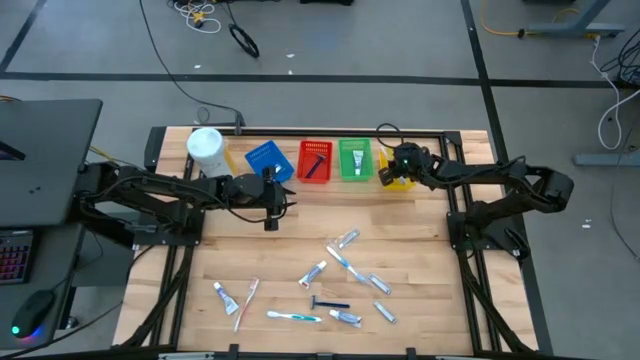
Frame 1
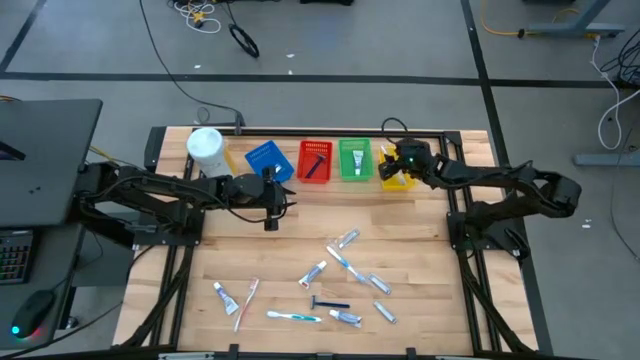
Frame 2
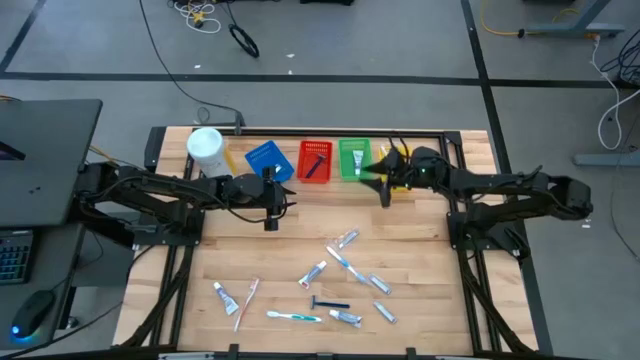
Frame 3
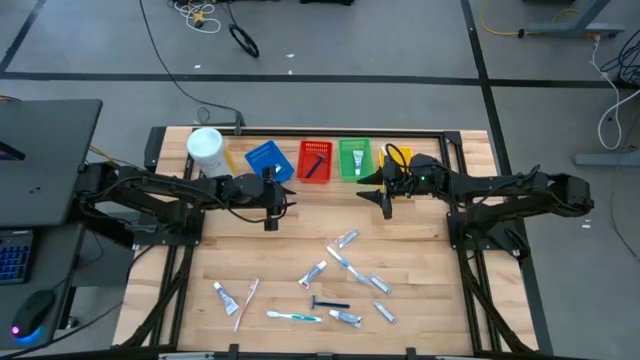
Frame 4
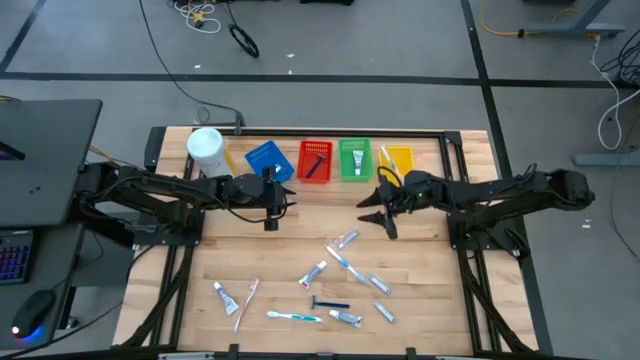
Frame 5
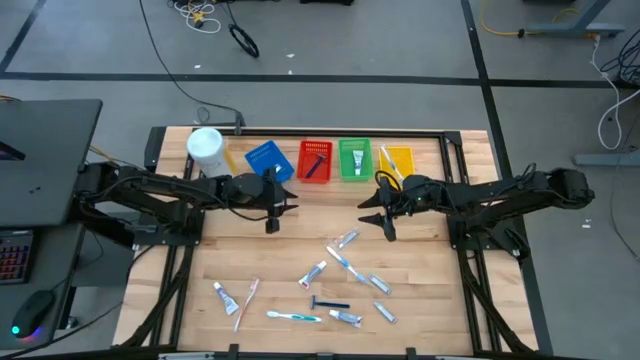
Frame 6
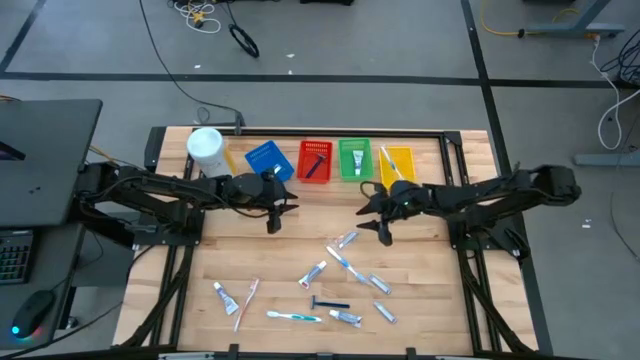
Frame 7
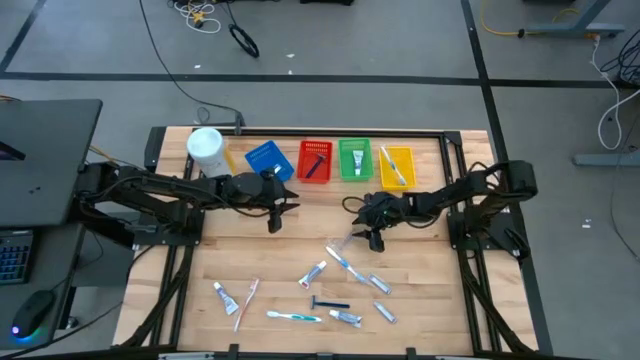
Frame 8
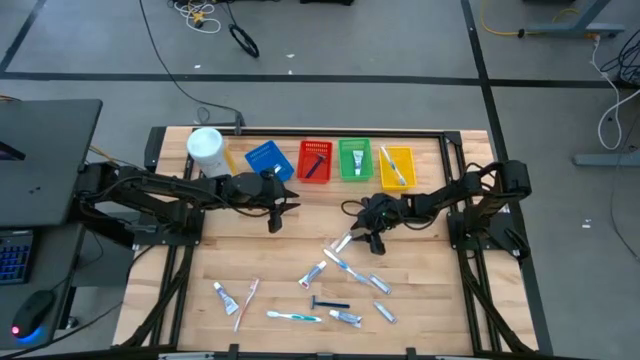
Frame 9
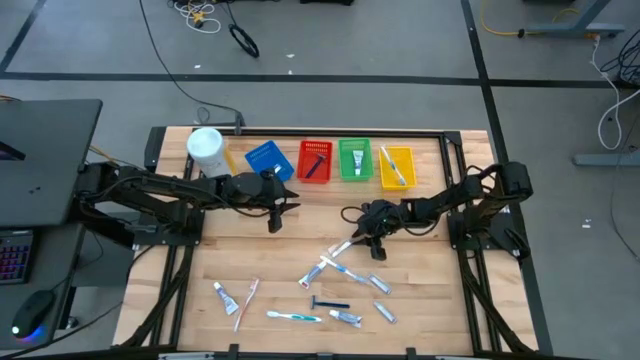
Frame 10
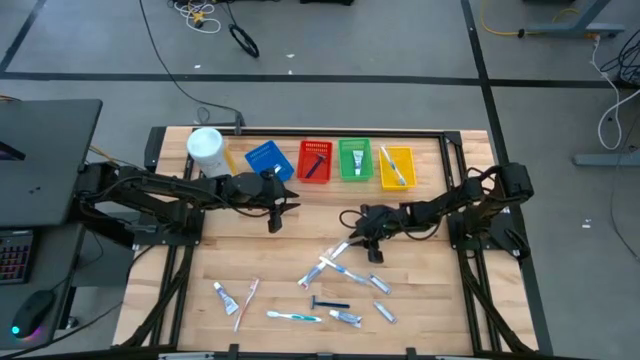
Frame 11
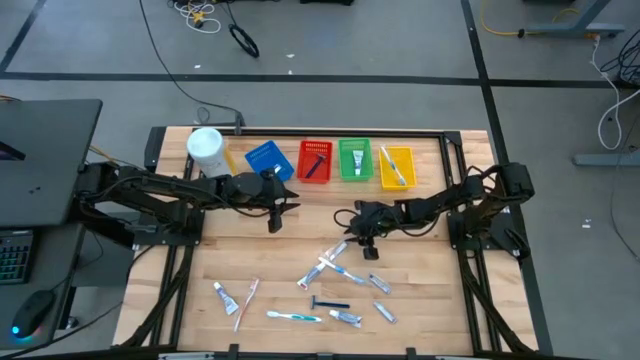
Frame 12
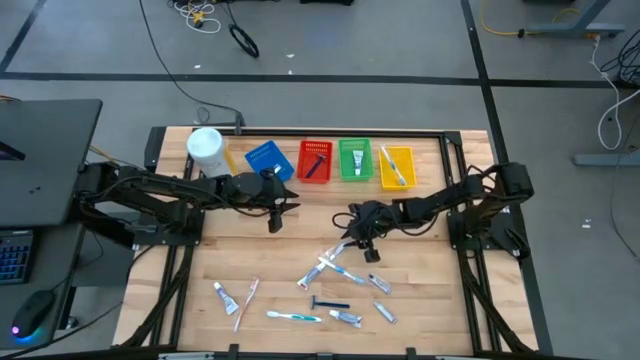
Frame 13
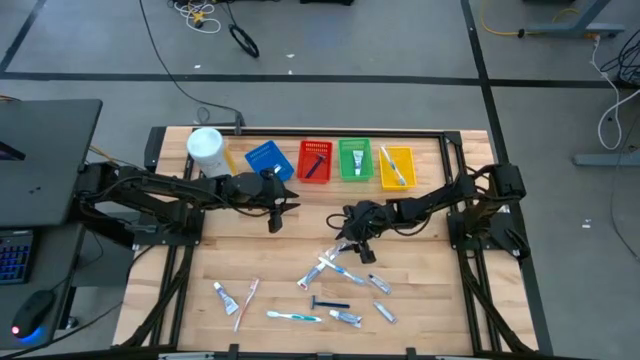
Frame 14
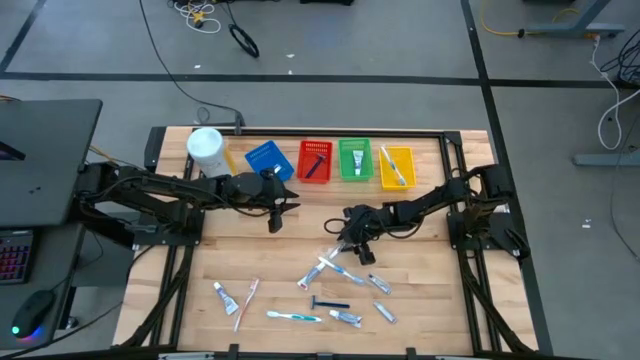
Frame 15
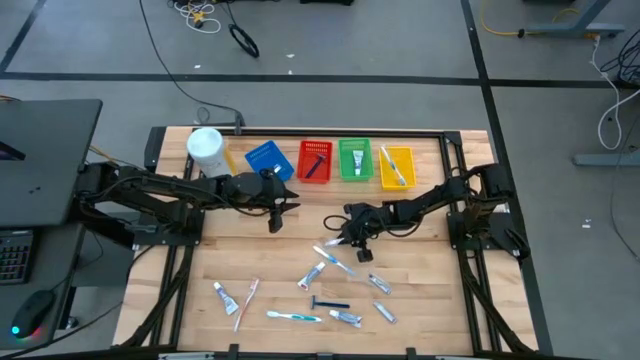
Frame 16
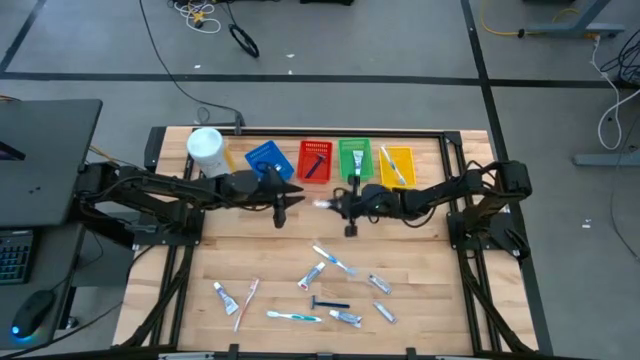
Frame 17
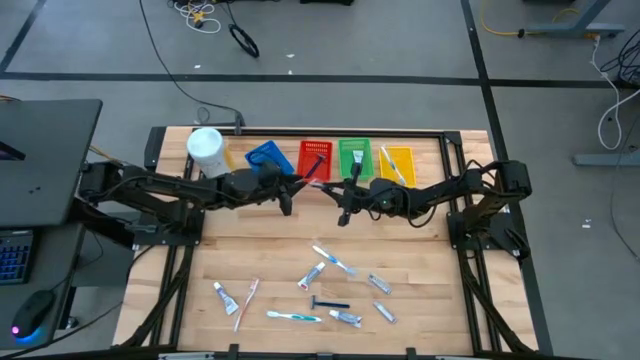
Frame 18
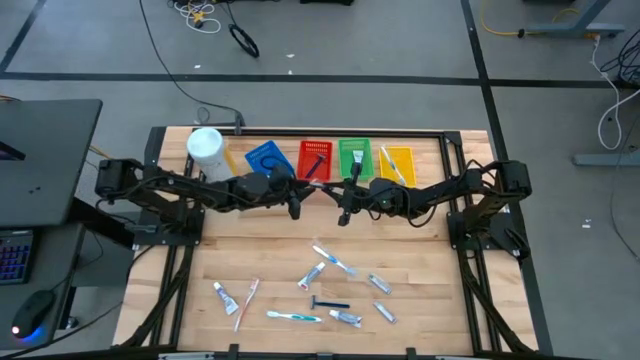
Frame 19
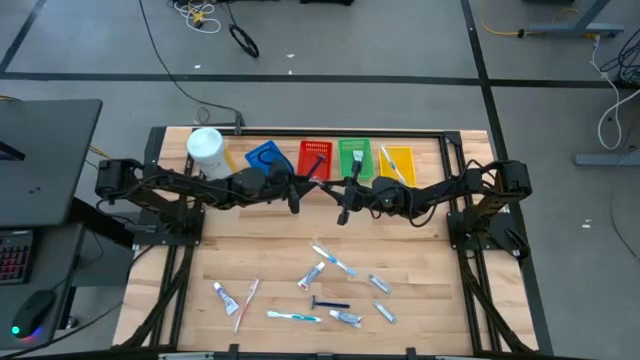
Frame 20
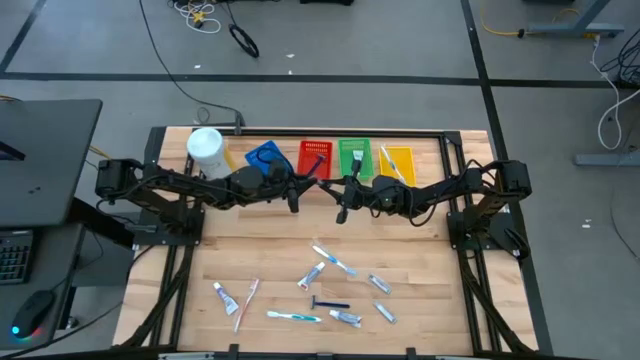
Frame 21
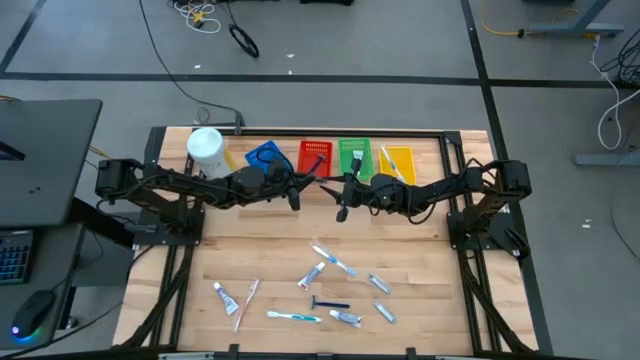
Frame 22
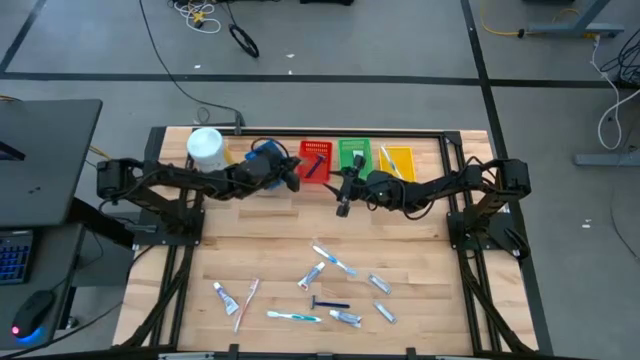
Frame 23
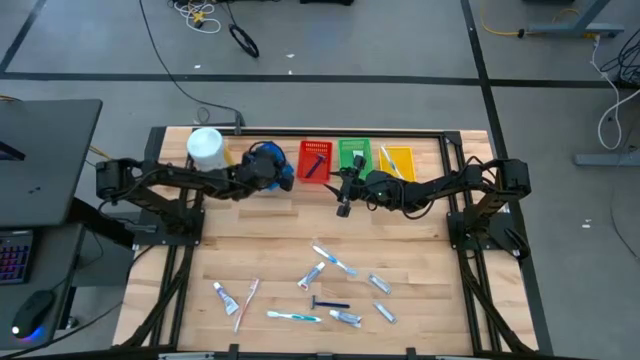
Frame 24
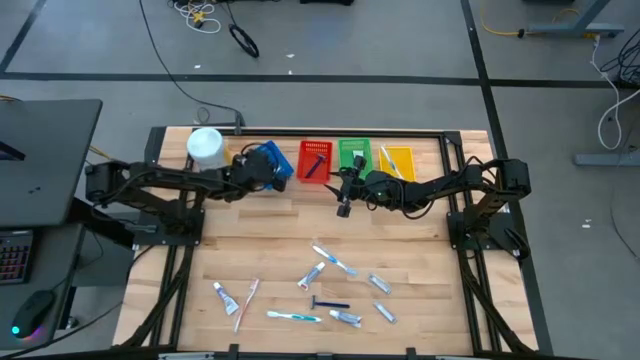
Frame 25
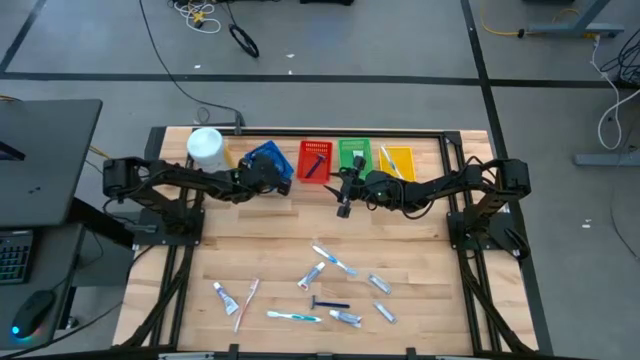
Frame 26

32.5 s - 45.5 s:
Task: Pick & Place Travel size toiletries
Put the silver nail cutter into the blue basket

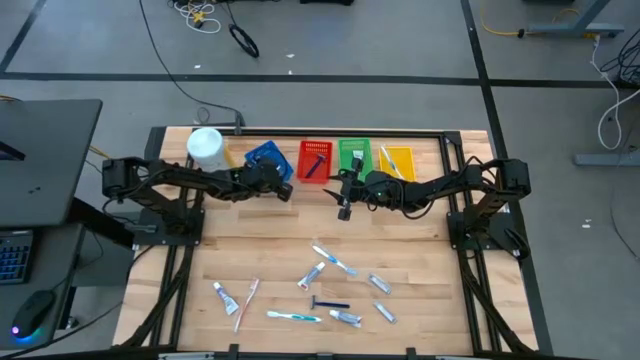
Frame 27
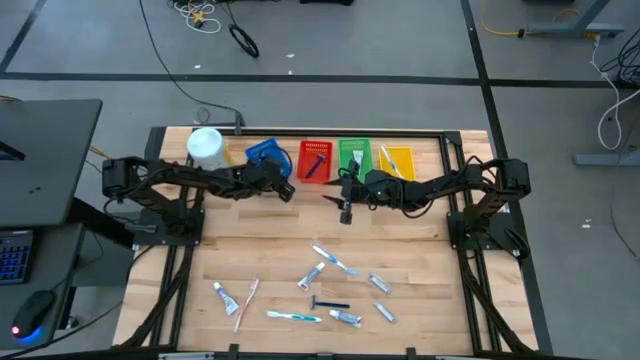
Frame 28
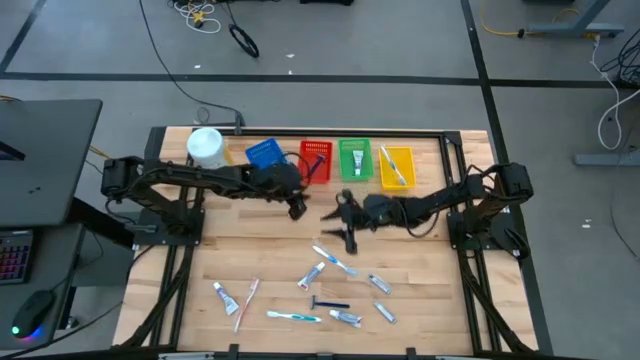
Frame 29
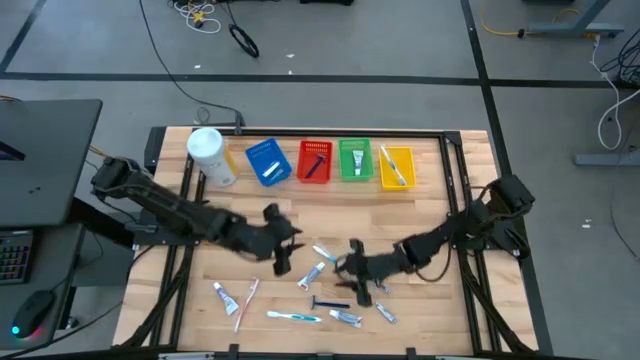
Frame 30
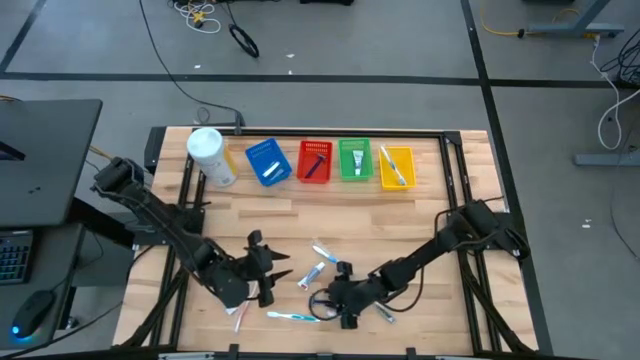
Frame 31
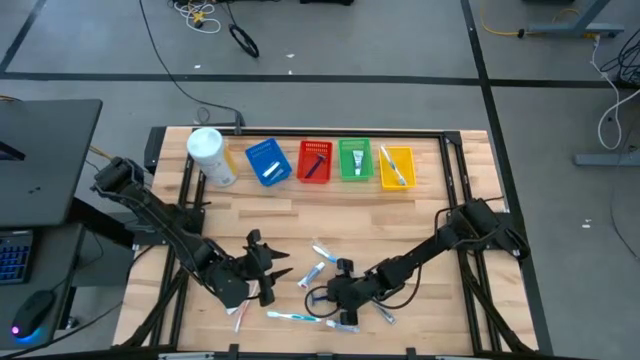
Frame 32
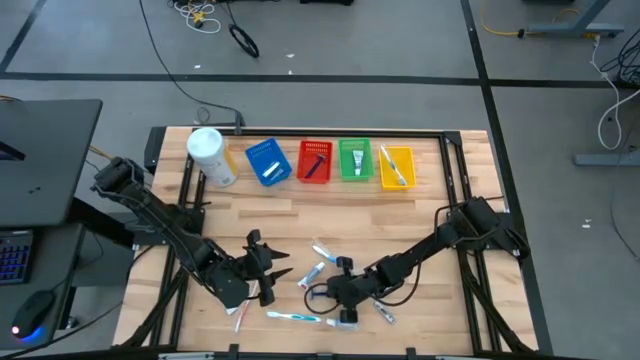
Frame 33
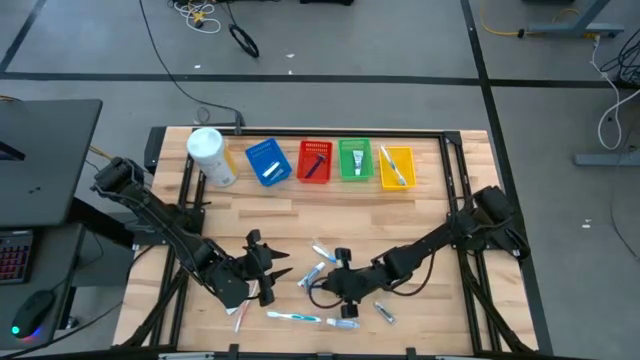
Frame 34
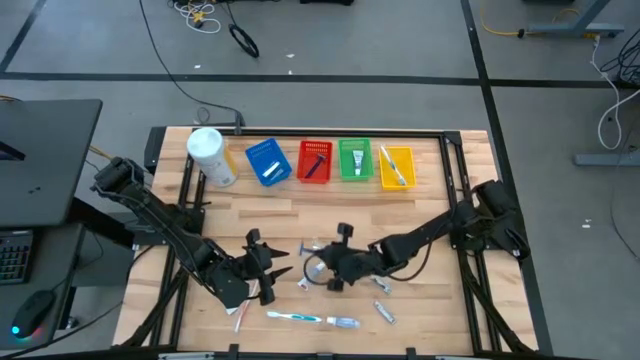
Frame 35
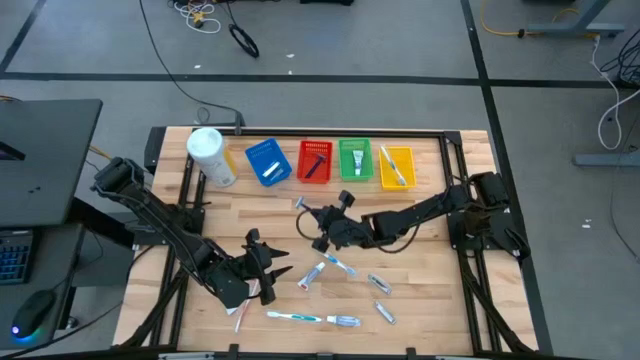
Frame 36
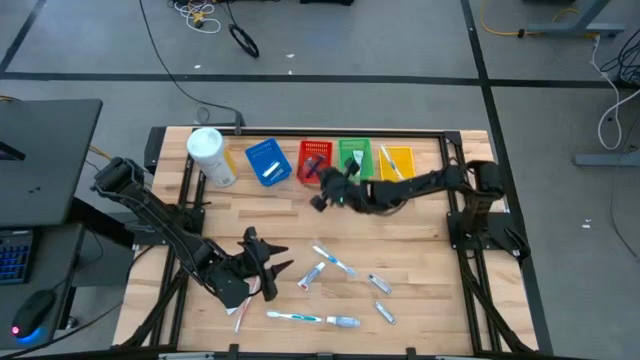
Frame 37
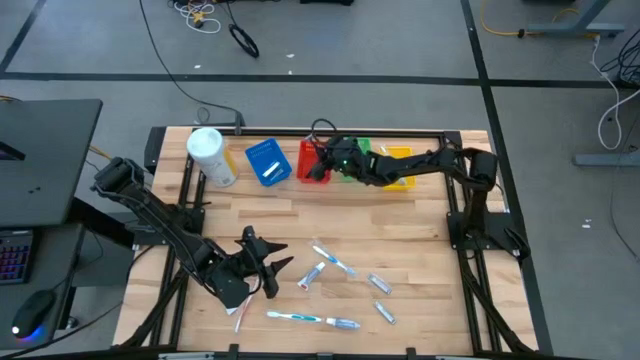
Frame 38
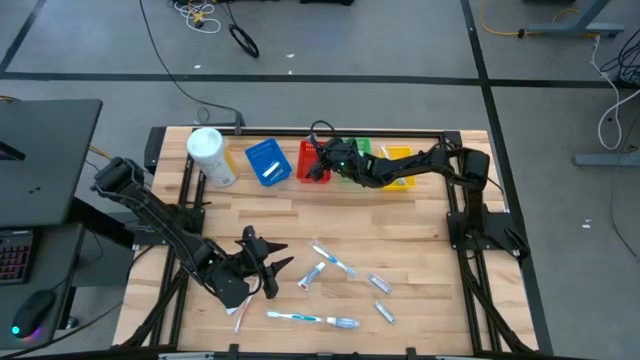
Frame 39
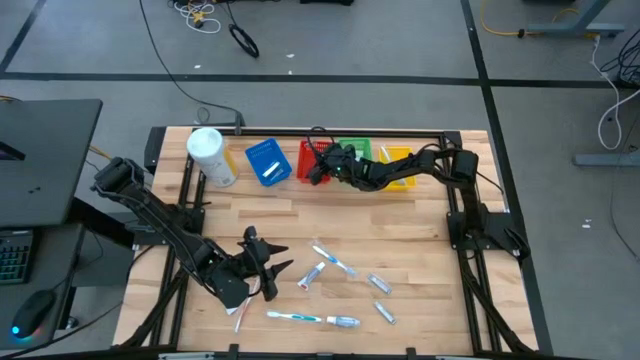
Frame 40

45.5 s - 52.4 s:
Put the blue razor into the red basket
